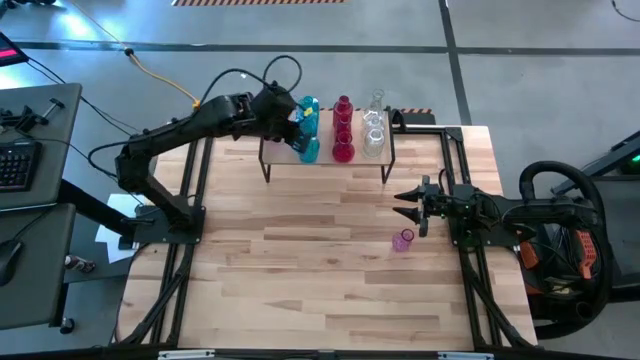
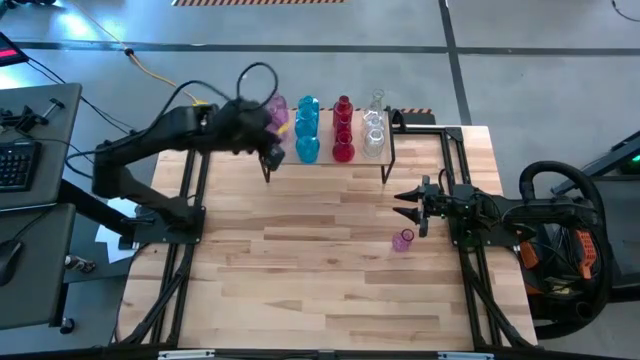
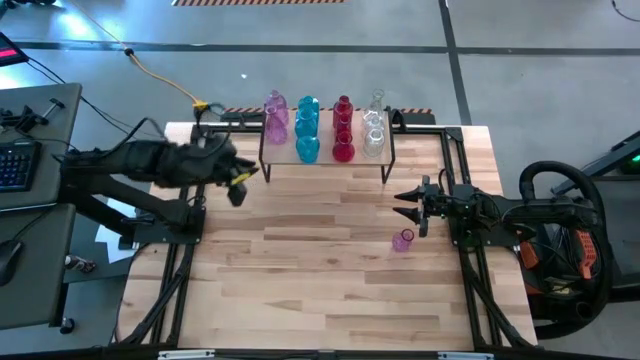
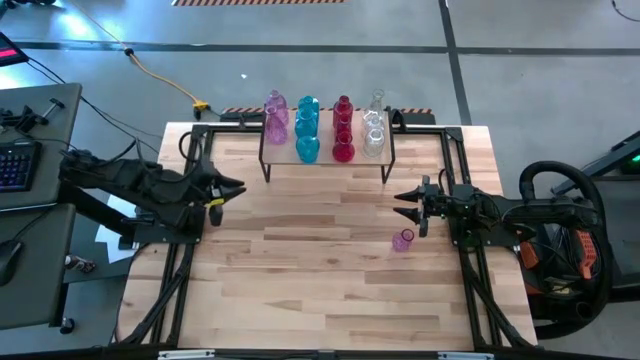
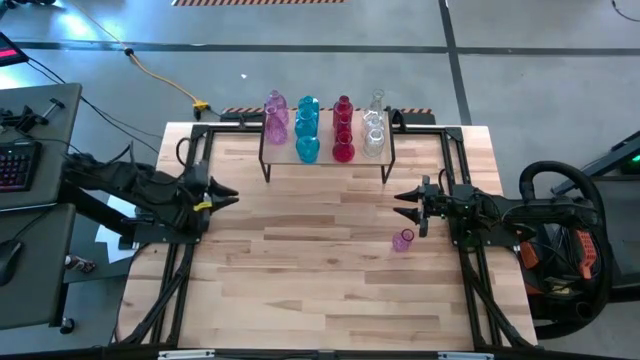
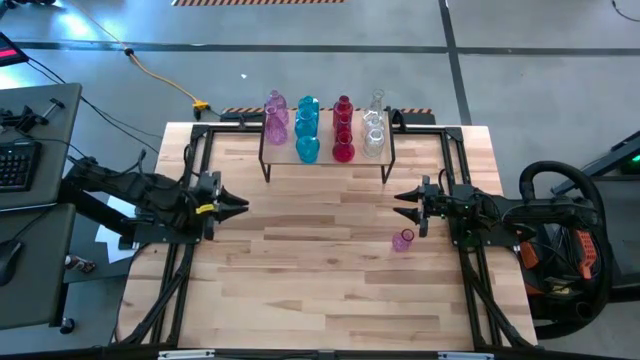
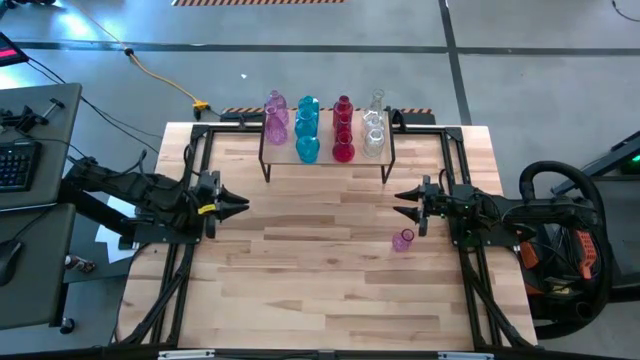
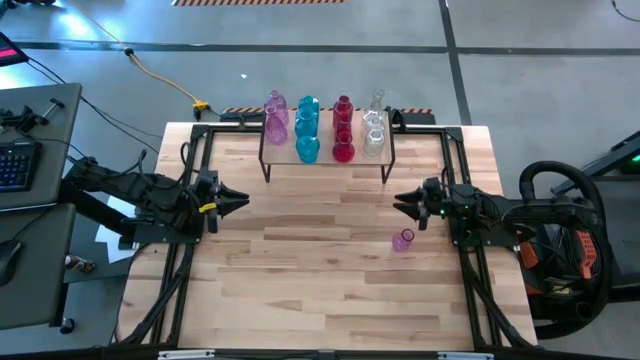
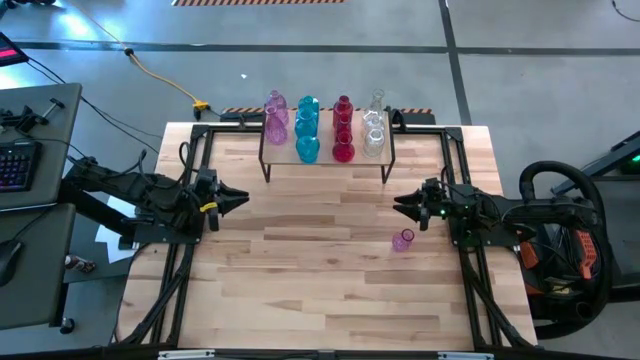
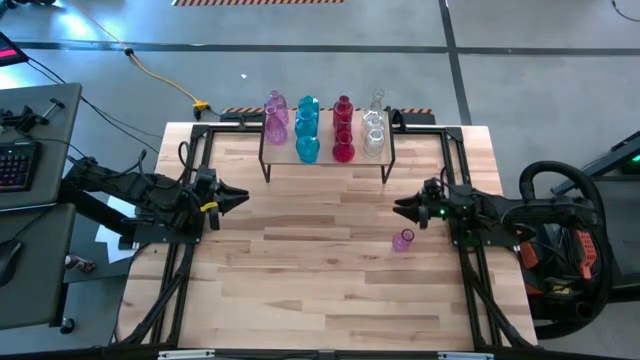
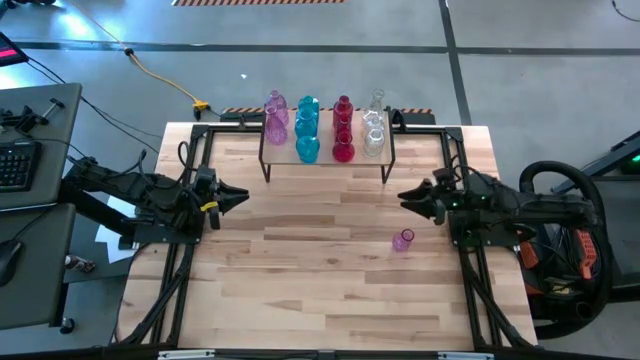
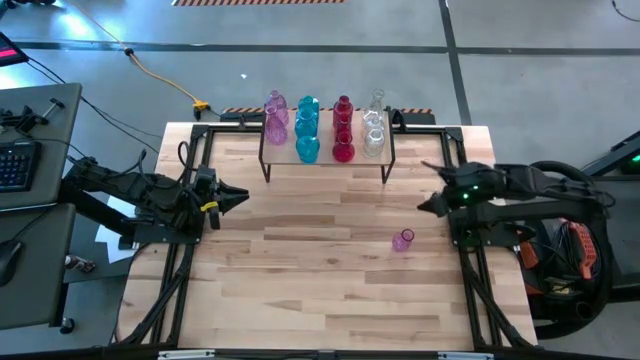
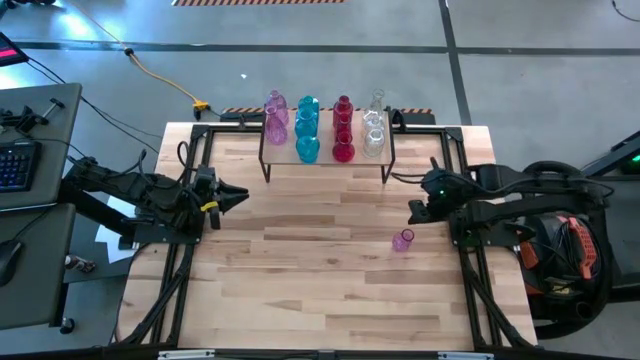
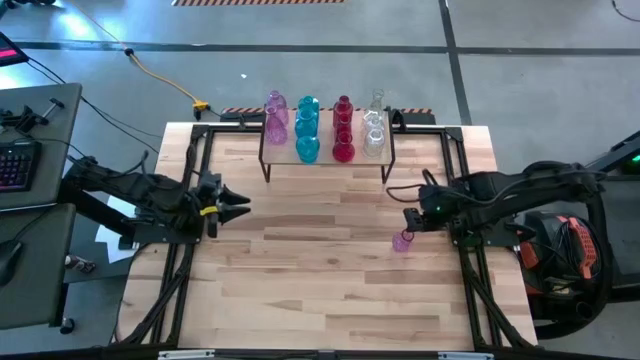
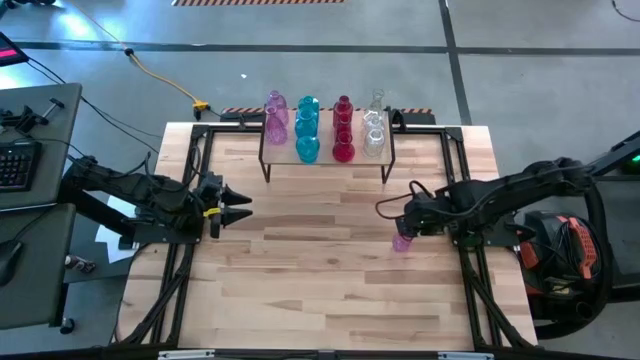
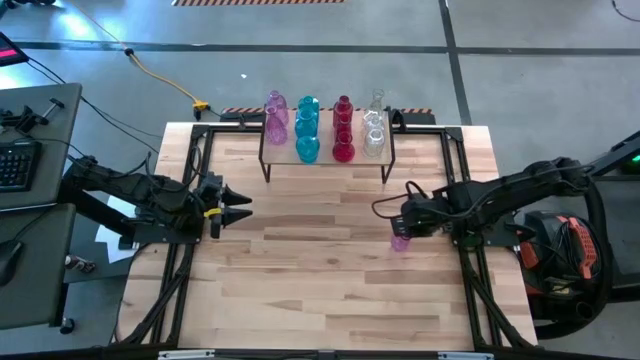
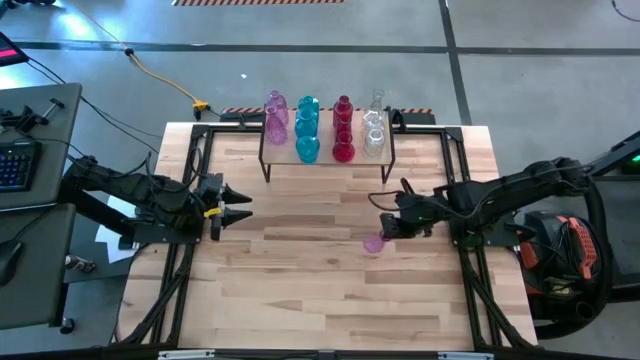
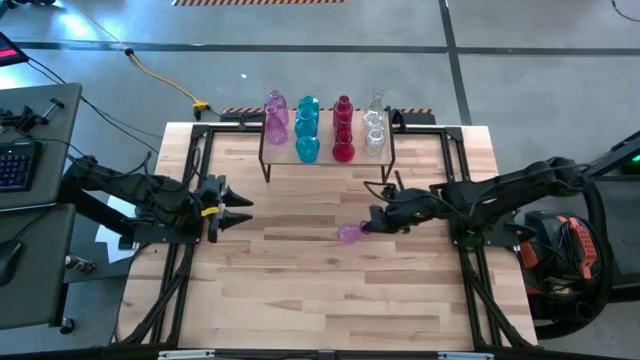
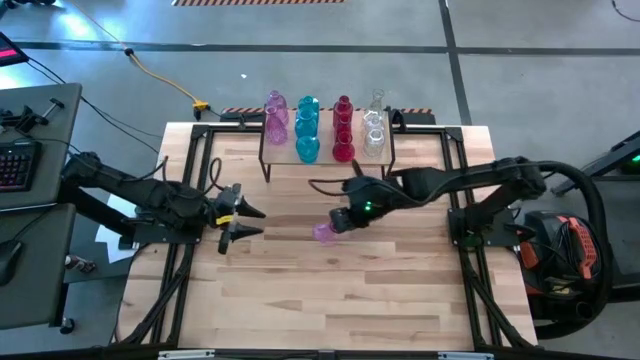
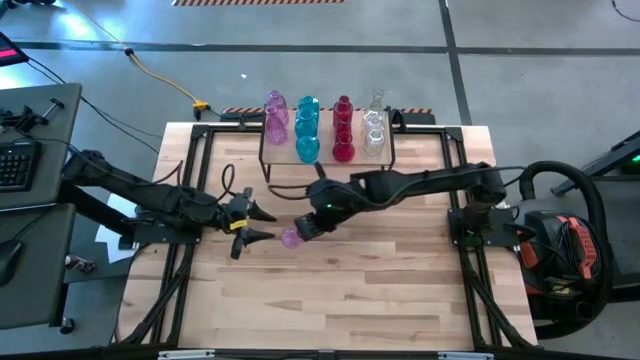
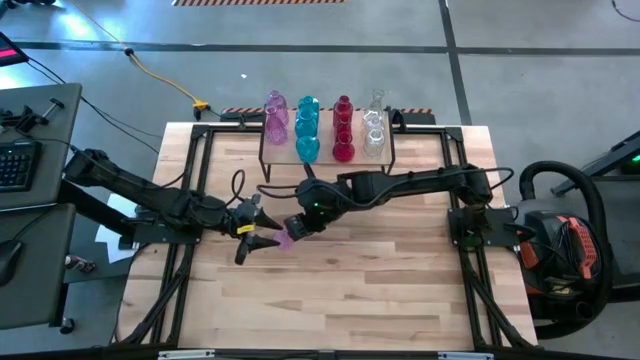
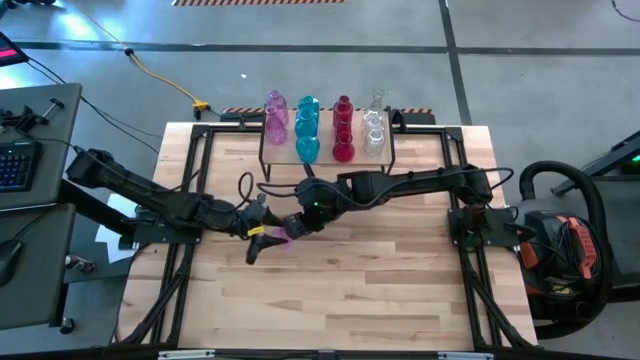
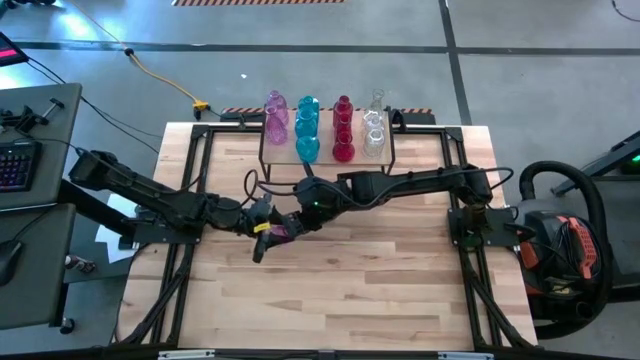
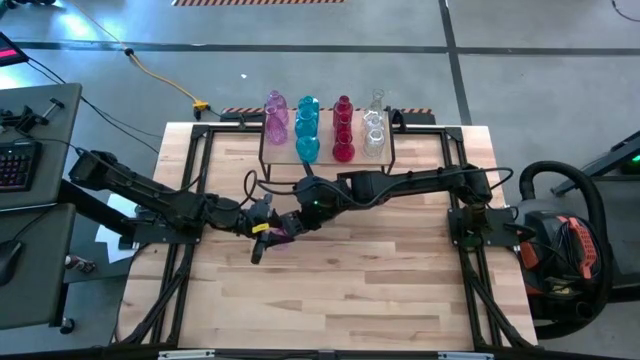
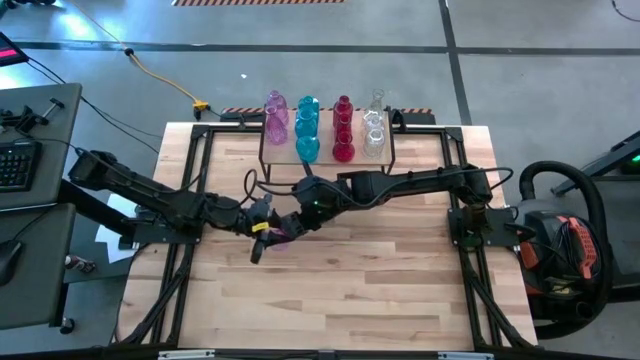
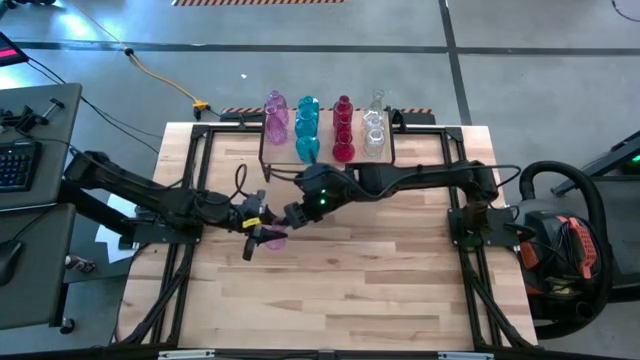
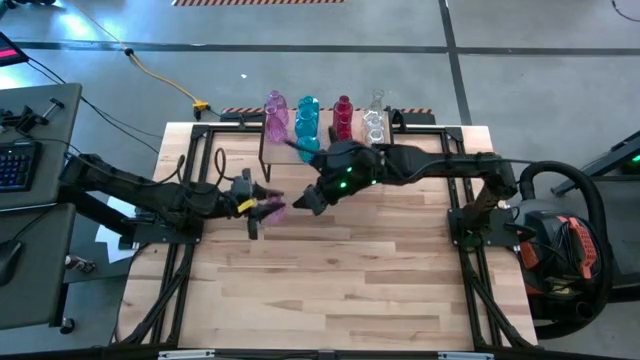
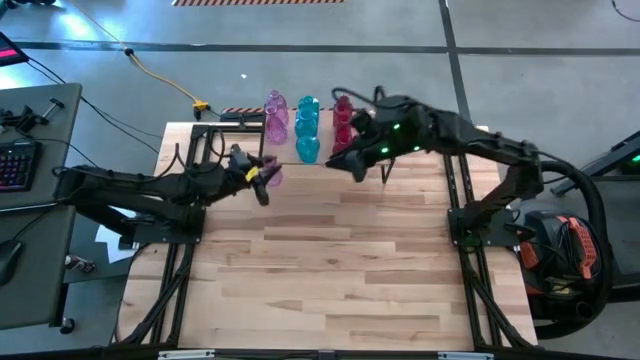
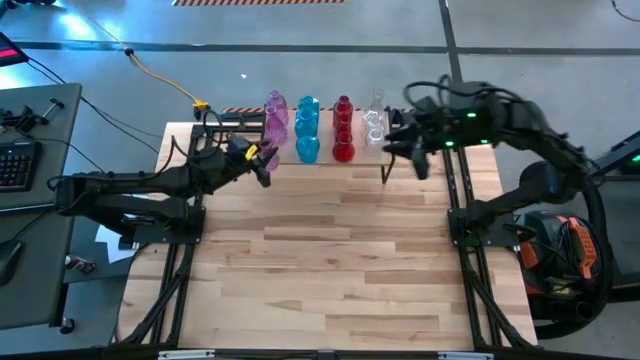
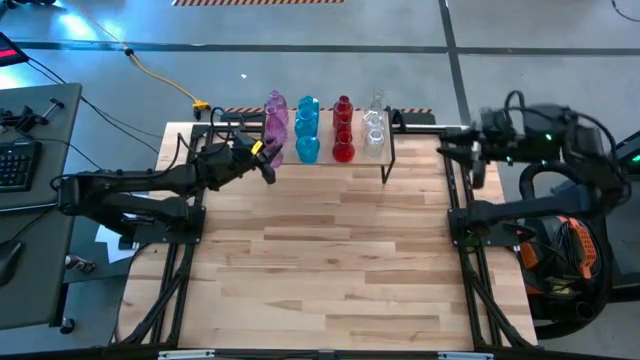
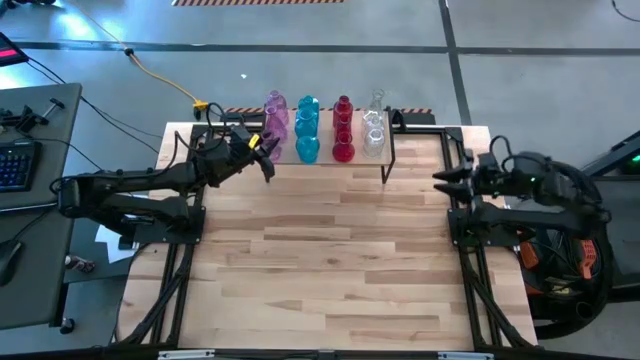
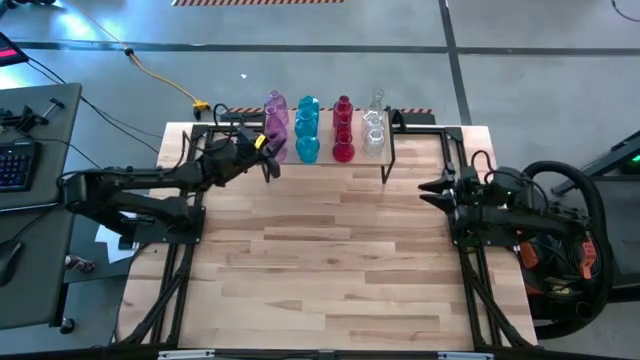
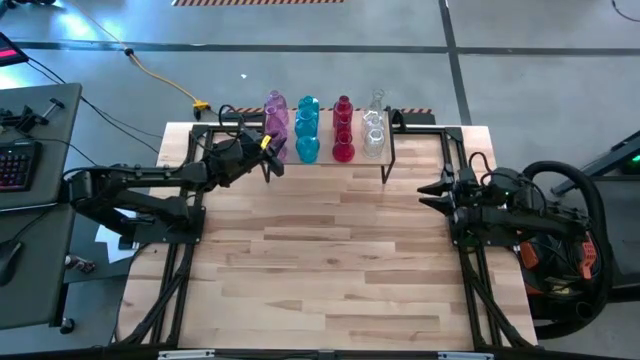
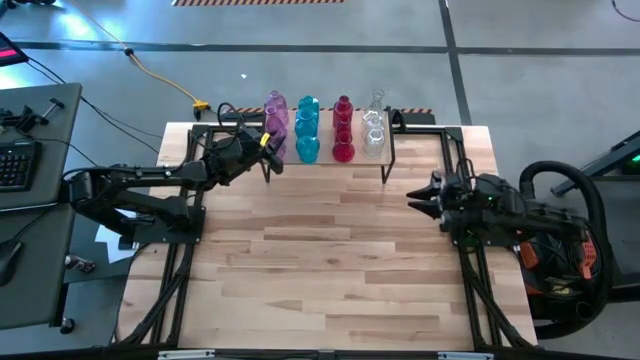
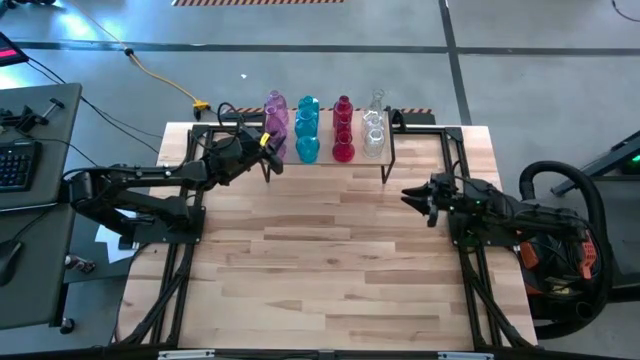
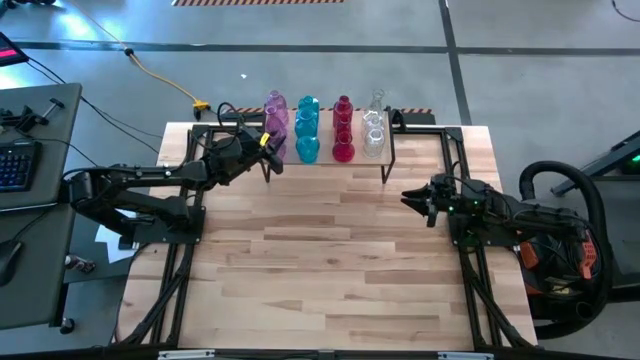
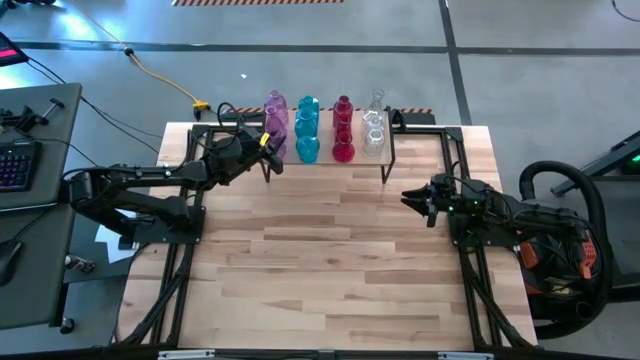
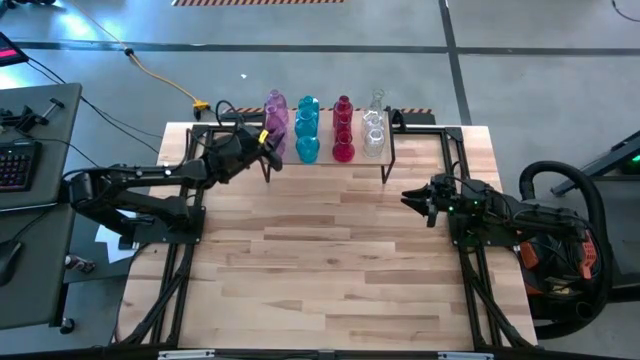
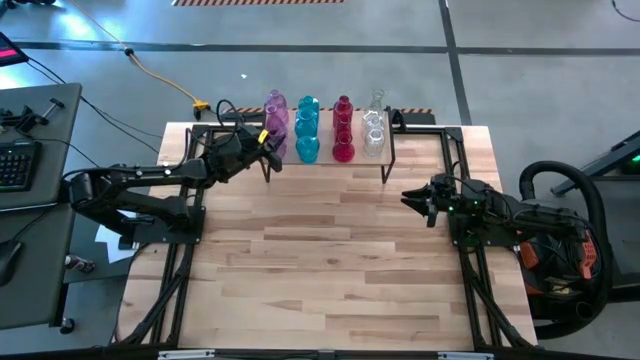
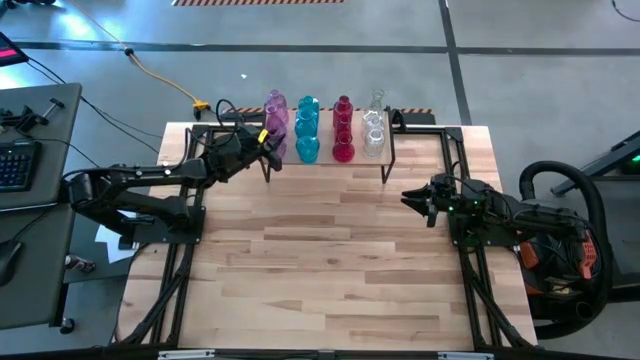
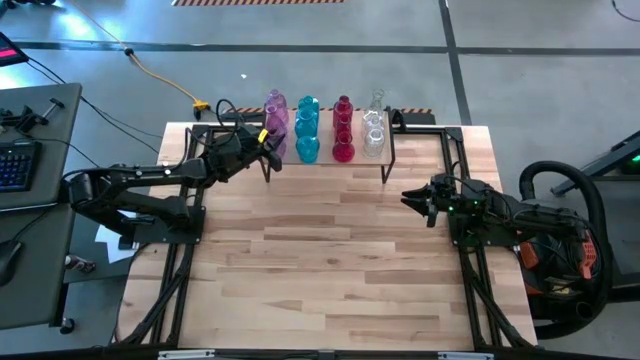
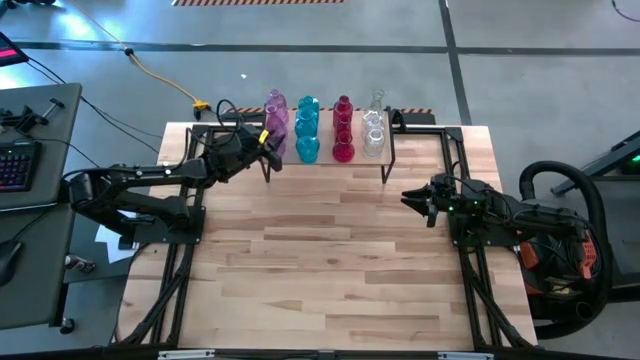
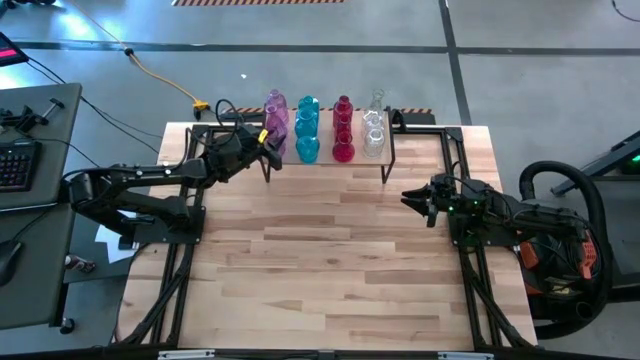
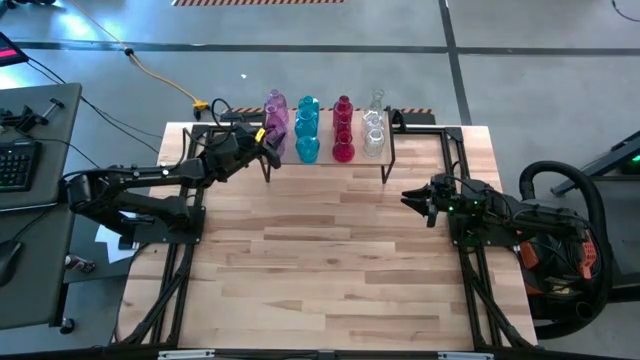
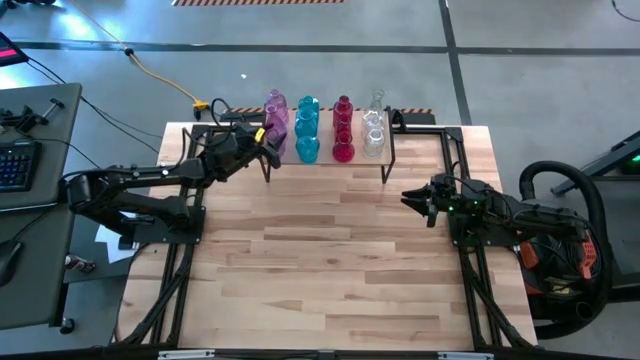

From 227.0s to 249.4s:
Task: sort vases onto shelf
Put the violet vase on the shelf aligned with the other violet vases
